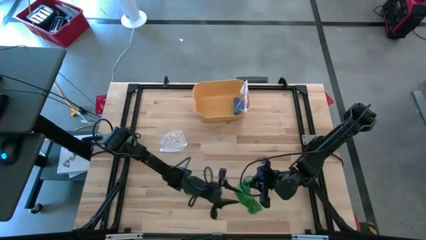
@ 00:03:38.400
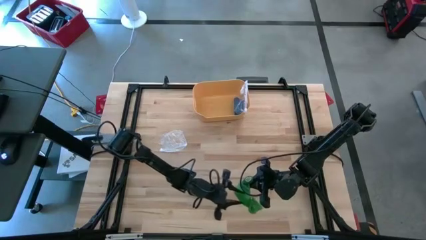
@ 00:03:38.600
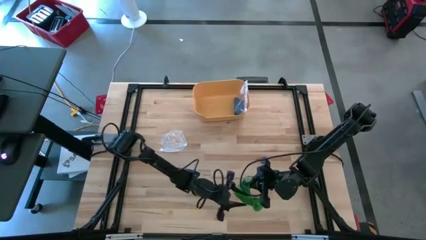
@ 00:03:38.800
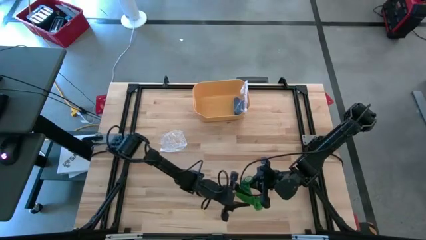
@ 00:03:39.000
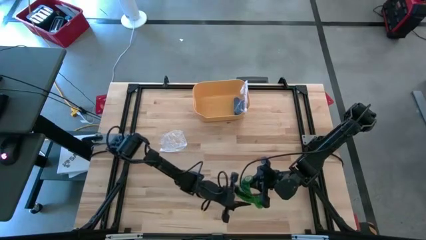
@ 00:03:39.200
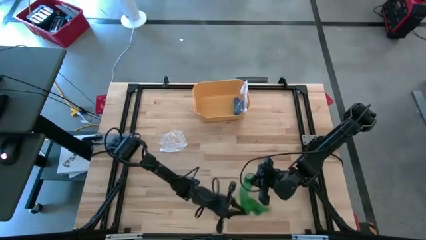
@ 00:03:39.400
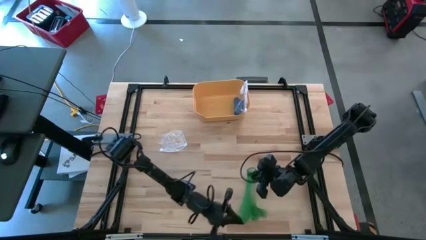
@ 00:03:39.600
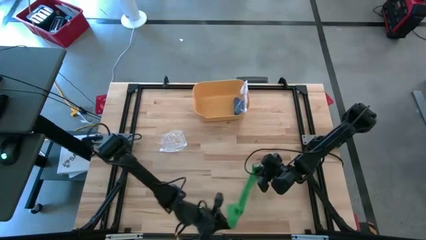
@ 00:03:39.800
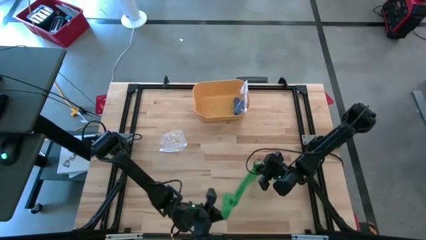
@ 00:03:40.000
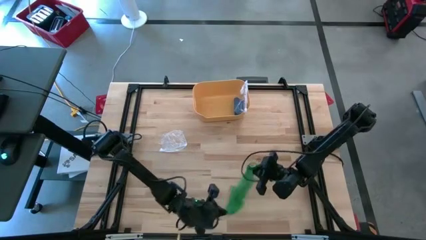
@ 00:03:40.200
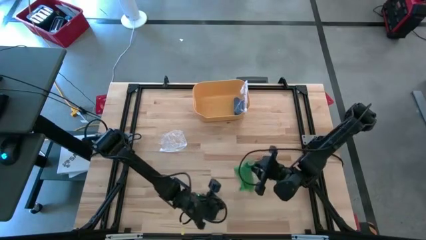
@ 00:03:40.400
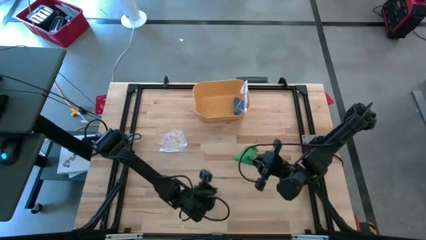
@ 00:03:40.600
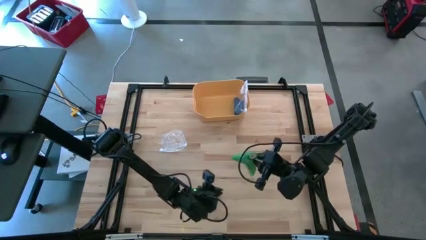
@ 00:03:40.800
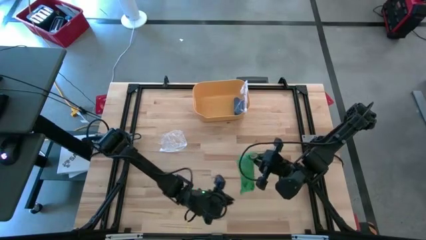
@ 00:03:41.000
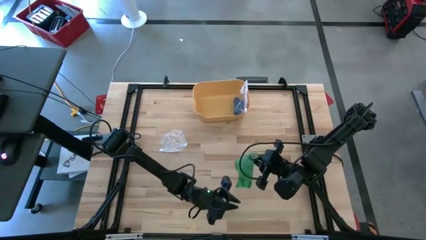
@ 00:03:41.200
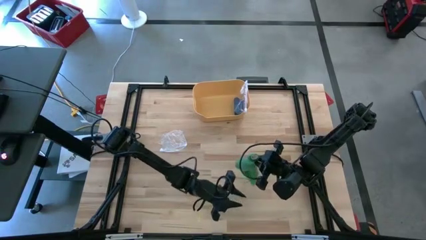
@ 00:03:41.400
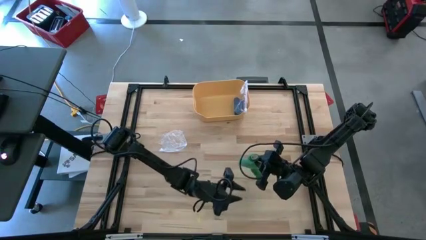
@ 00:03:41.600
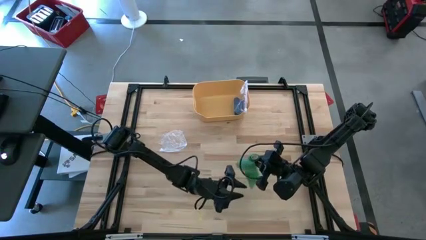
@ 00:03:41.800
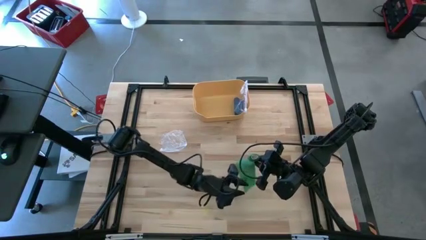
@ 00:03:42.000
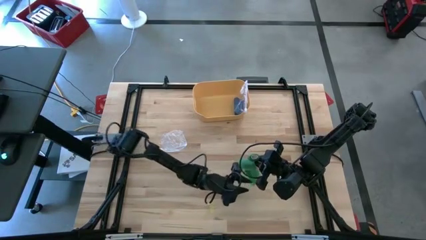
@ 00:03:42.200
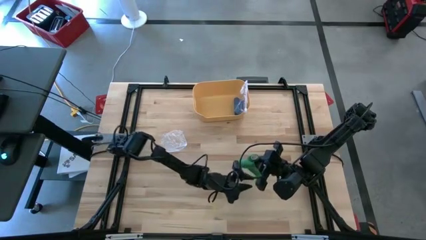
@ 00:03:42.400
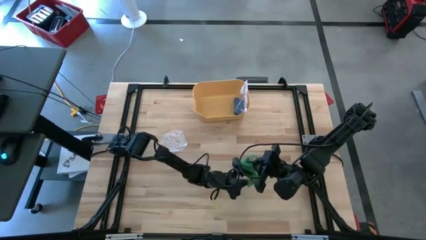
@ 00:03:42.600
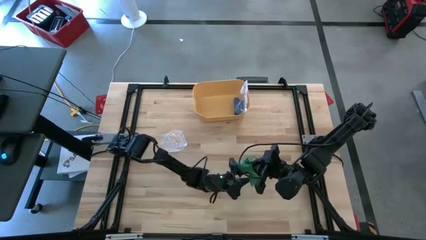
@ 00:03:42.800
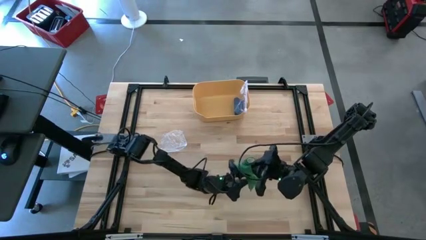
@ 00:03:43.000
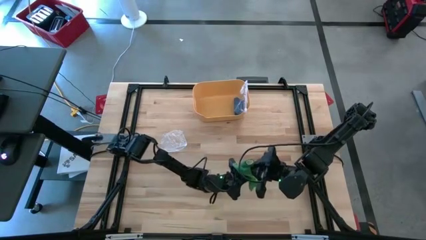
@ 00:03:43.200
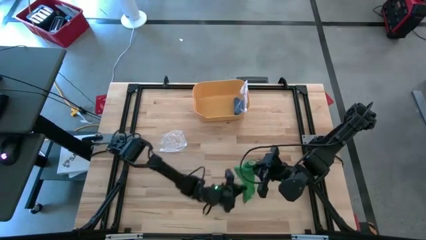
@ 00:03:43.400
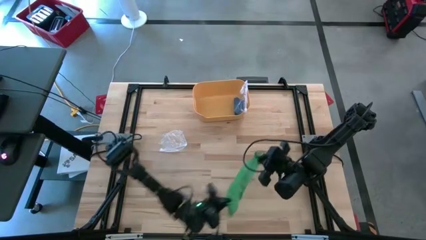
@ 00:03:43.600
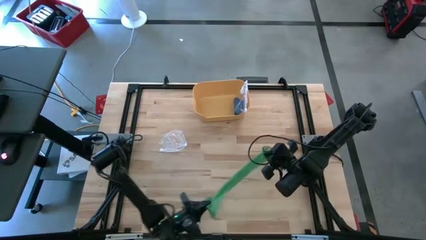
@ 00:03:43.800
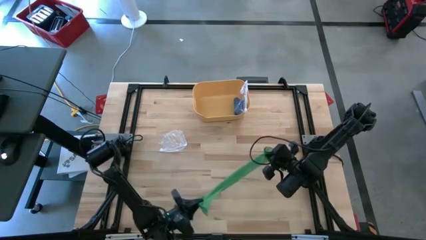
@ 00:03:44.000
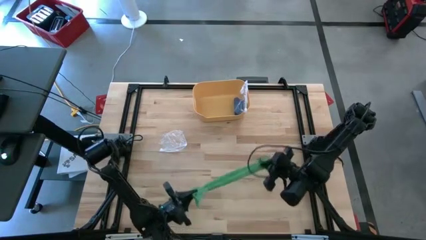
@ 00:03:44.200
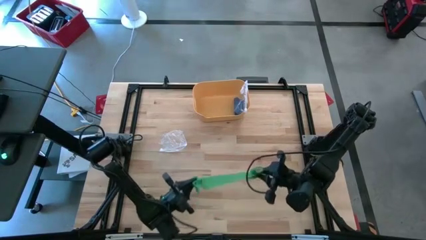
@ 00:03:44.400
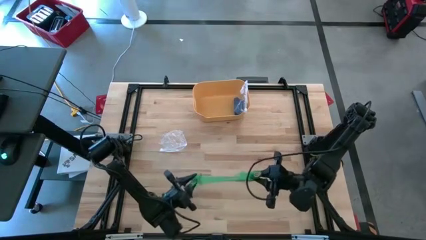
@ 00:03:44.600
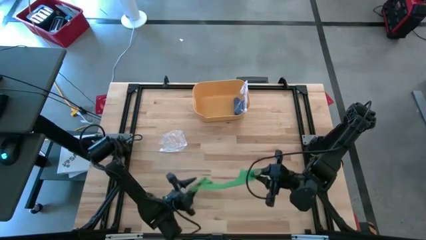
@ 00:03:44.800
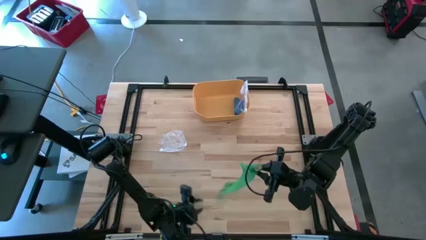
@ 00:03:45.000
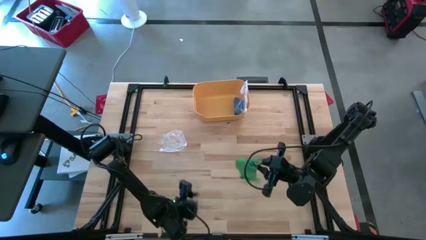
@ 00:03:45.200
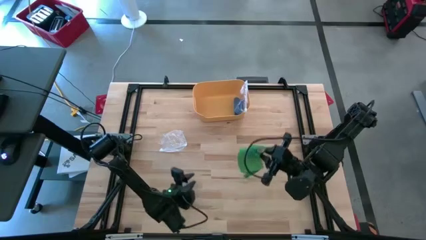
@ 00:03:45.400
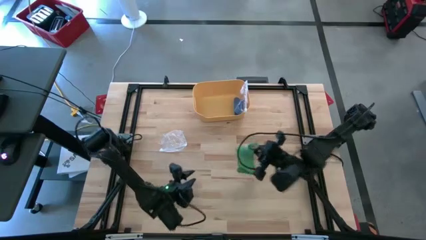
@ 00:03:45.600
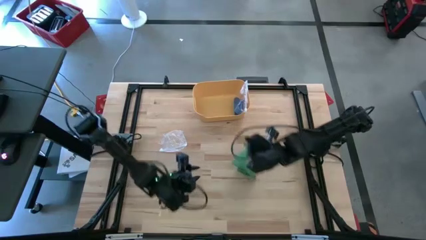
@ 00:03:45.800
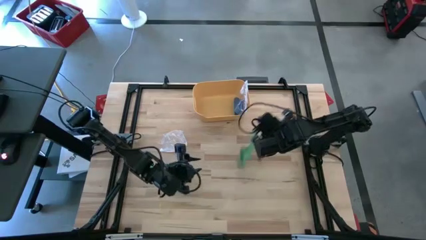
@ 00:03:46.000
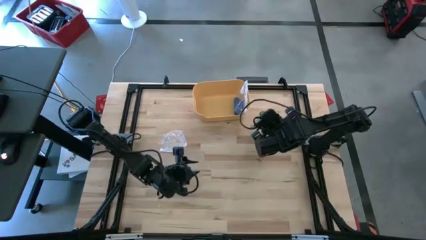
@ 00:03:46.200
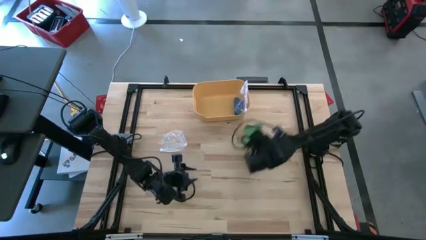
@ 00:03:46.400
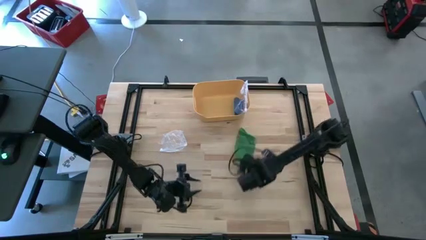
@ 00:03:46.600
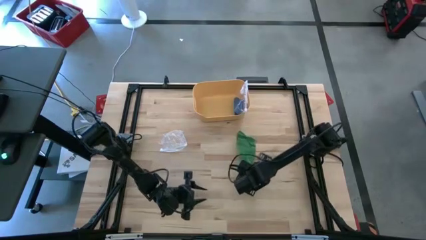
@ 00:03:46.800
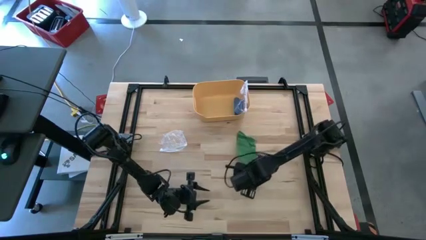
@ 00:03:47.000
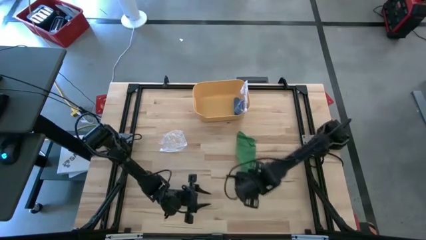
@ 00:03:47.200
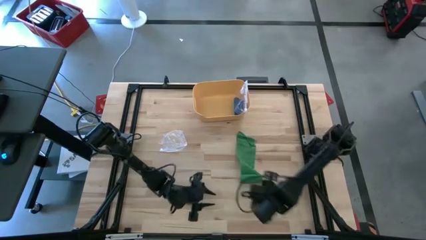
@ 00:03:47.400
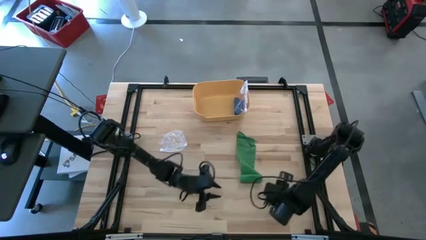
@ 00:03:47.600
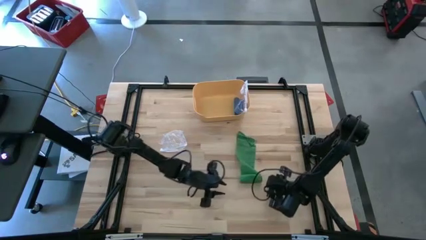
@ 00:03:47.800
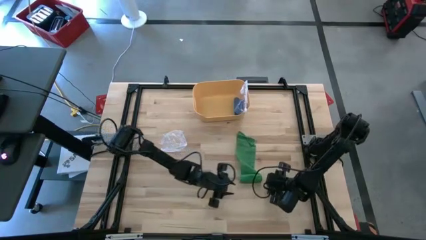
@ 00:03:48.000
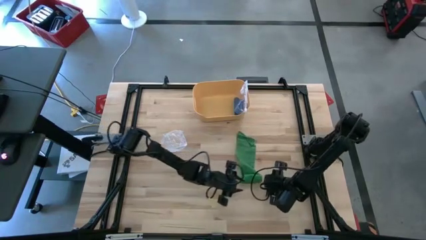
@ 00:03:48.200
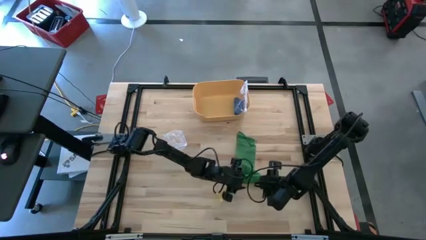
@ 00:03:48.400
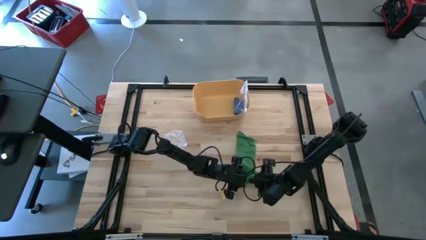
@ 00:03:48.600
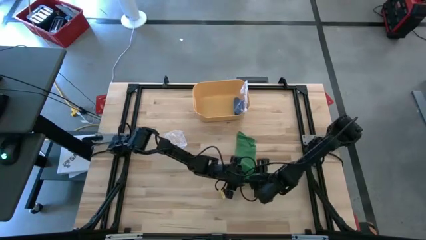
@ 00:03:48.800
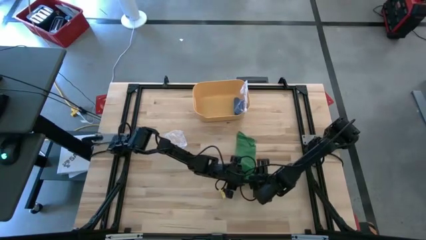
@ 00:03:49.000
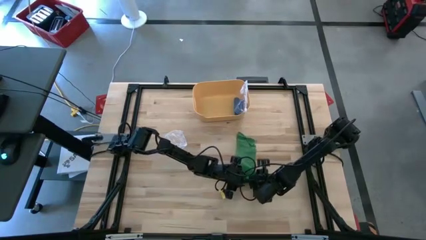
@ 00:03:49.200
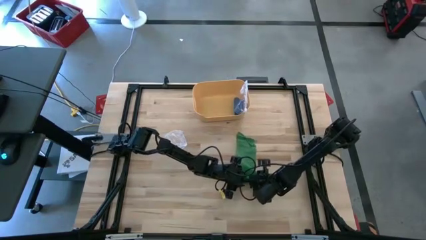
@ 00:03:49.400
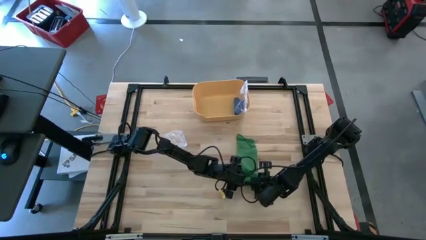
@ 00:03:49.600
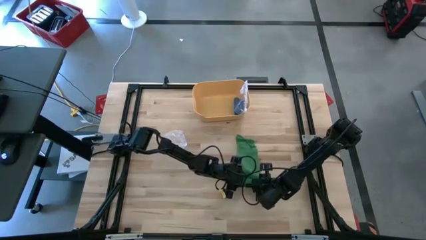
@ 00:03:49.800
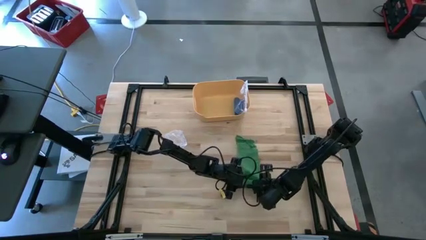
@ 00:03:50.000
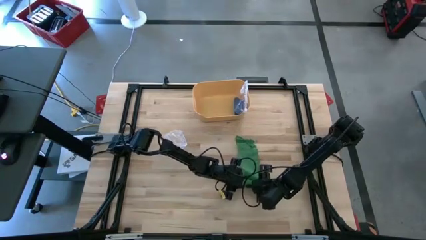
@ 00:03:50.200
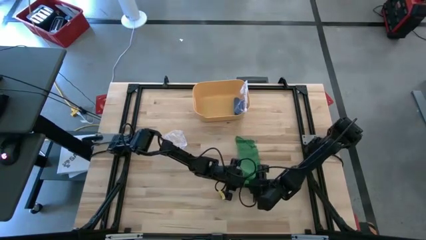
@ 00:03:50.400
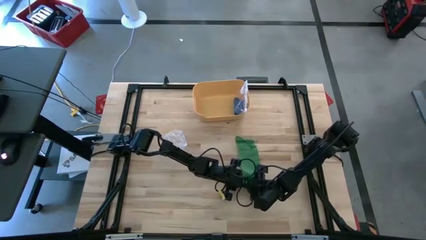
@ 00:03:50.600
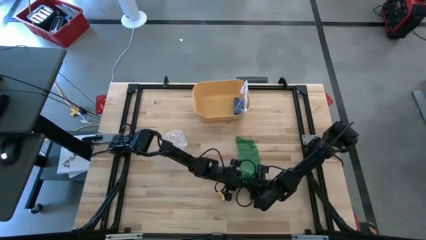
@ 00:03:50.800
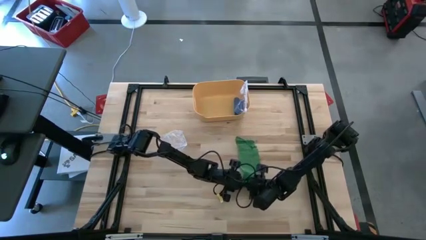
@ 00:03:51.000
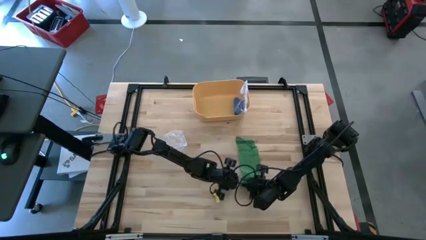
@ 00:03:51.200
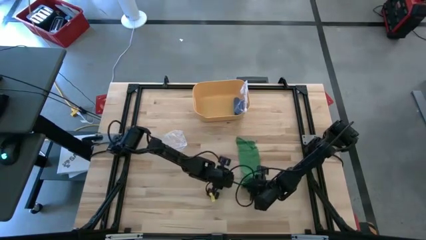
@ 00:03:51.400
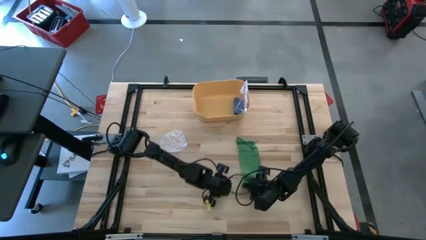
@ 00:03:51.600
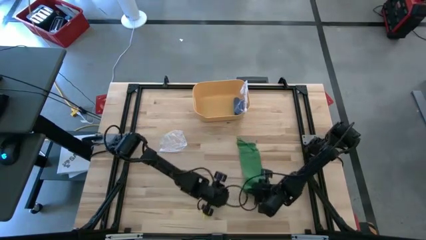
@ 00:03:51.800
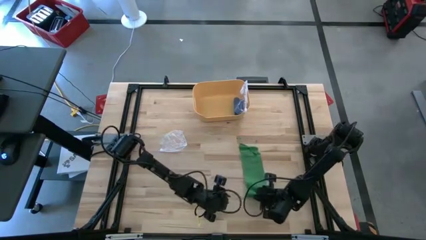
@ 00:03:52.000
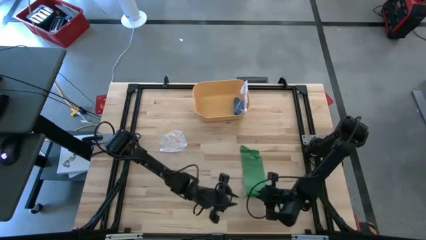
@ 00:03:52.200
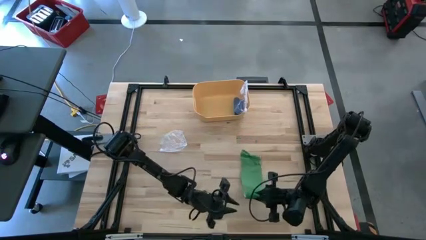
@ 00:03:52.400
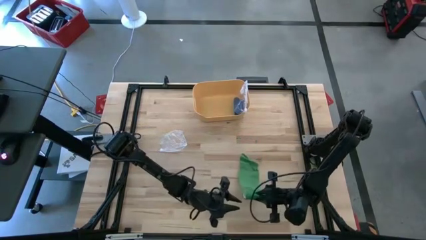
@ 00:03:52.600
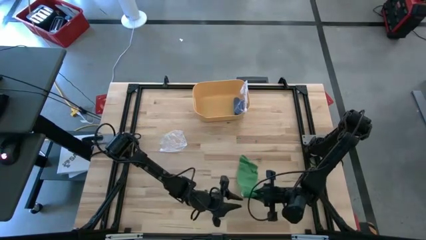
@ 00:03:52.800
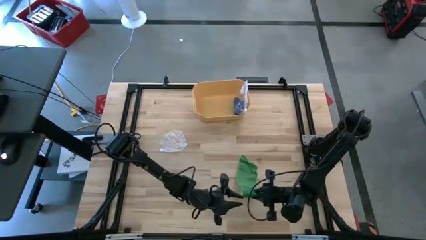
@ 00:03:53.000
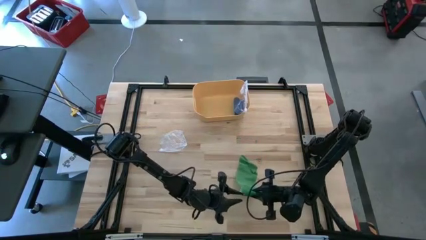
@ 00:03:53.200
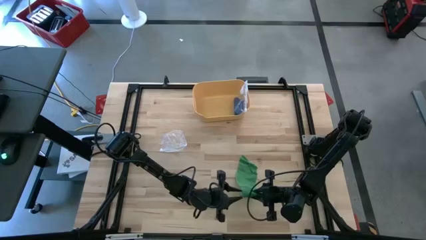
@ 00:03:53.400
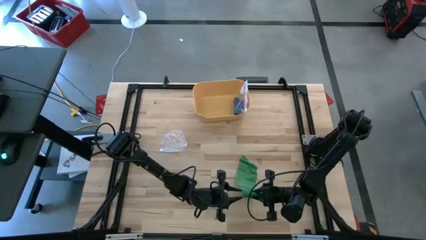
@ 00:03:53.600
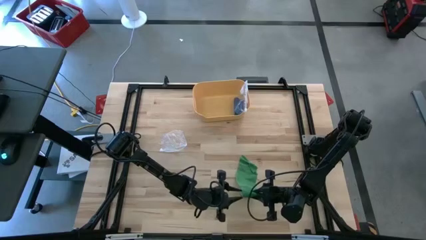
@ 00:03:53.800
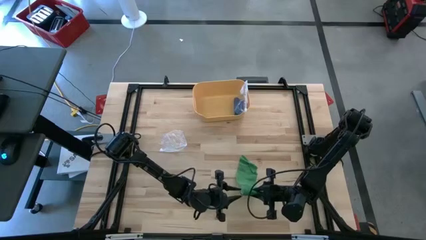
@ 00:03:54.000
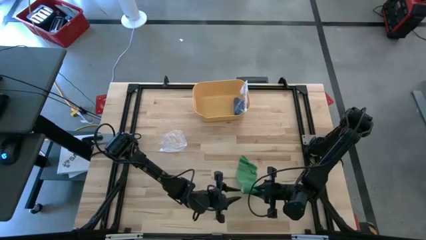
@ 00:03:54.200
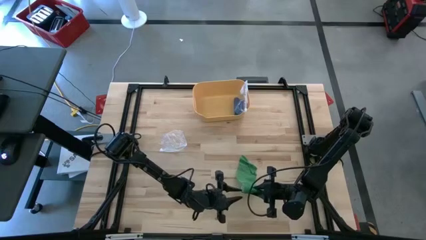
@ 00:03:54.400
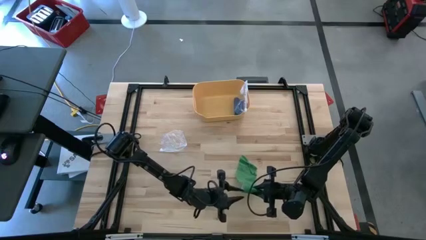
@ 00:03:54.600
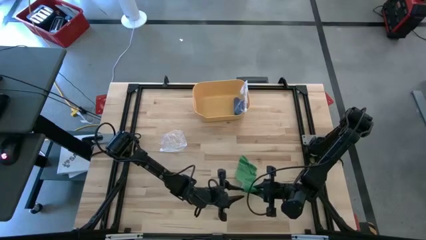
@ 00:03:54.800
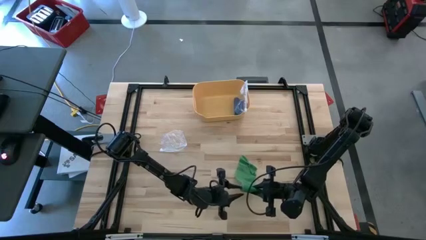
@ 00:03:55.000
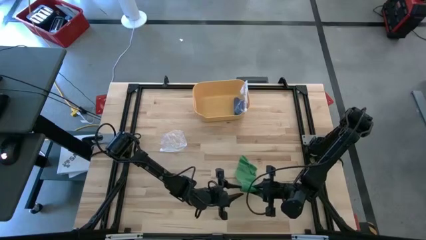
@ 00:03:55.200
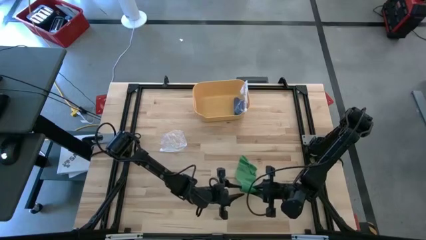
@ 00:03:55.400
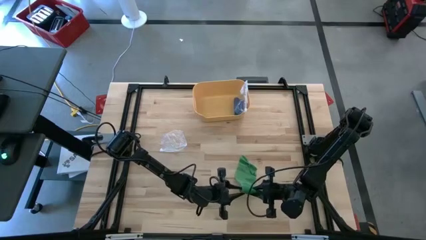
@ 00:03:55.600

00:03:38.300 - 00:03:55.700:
Task: Roll bandage
Roll the green bandage
